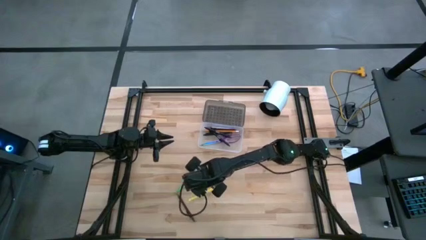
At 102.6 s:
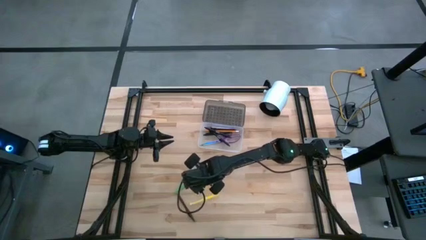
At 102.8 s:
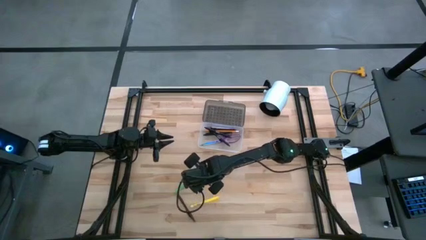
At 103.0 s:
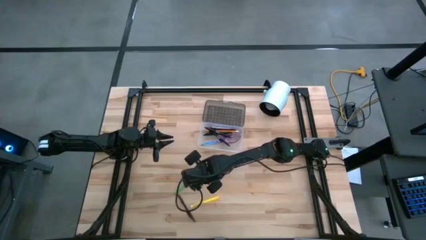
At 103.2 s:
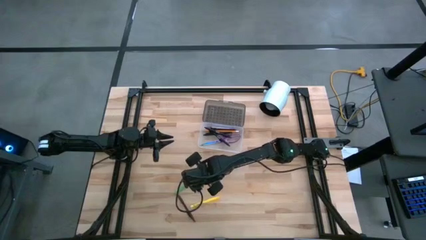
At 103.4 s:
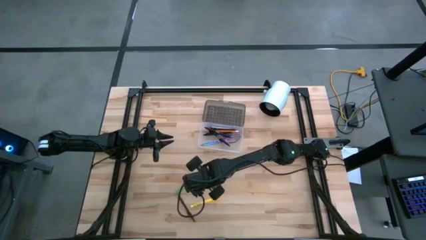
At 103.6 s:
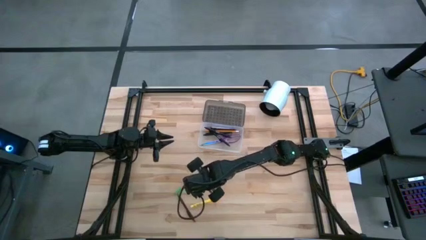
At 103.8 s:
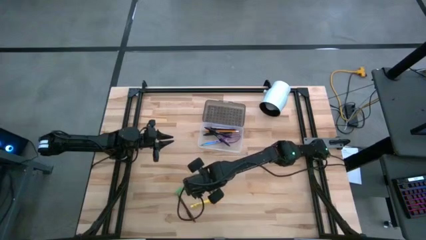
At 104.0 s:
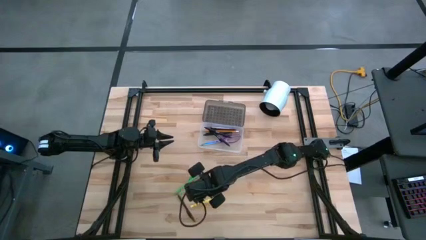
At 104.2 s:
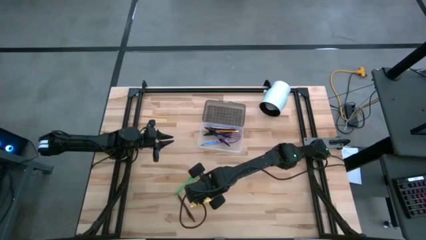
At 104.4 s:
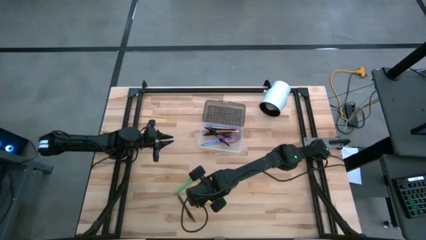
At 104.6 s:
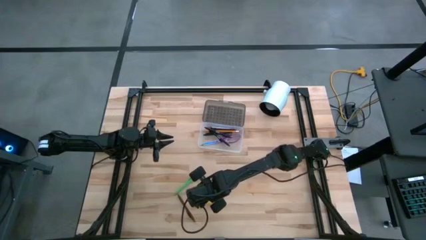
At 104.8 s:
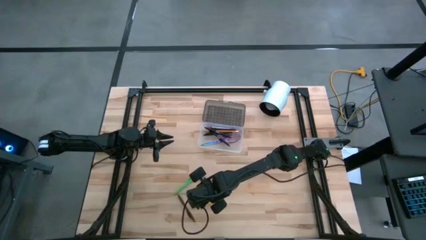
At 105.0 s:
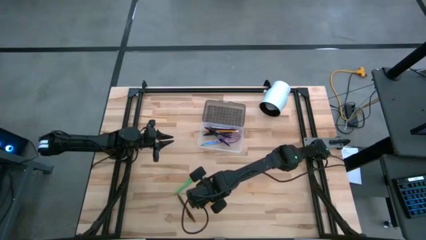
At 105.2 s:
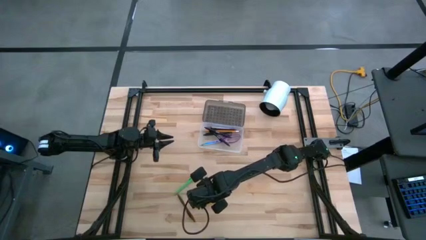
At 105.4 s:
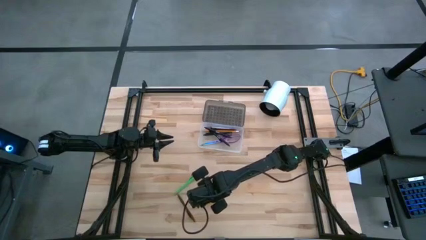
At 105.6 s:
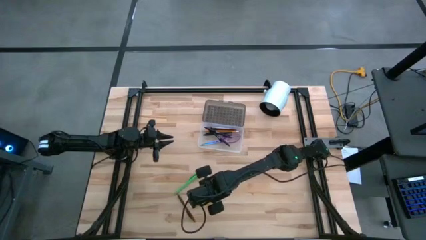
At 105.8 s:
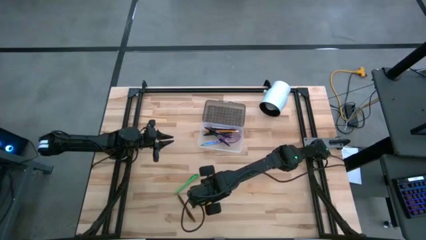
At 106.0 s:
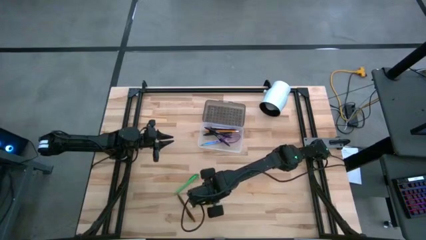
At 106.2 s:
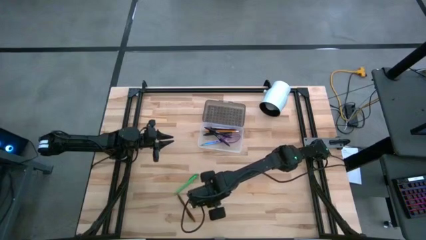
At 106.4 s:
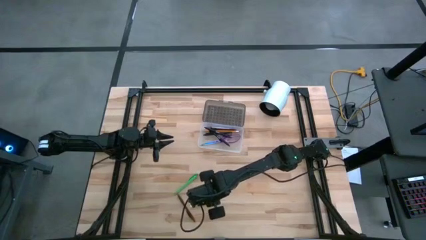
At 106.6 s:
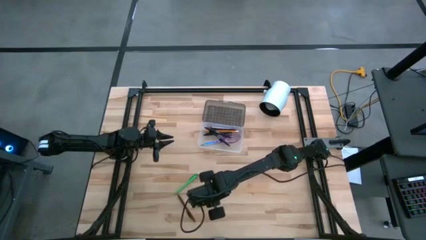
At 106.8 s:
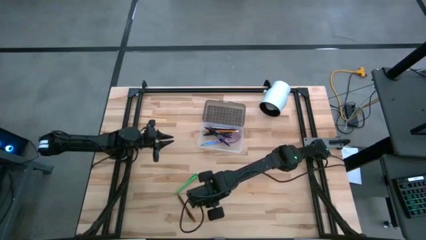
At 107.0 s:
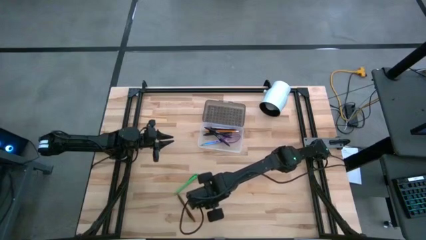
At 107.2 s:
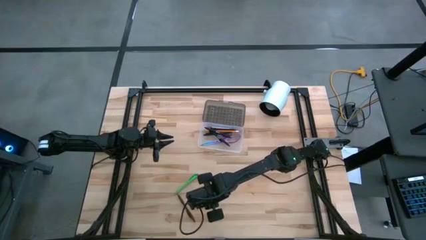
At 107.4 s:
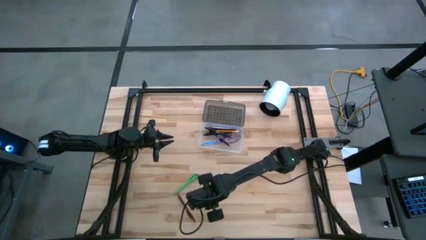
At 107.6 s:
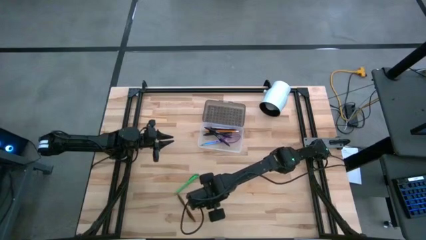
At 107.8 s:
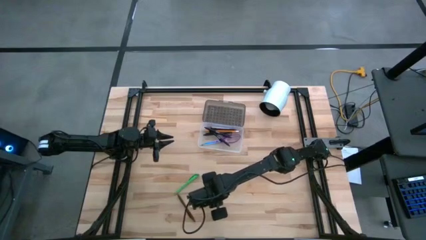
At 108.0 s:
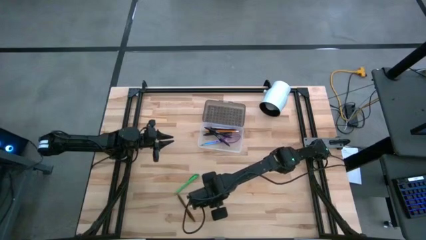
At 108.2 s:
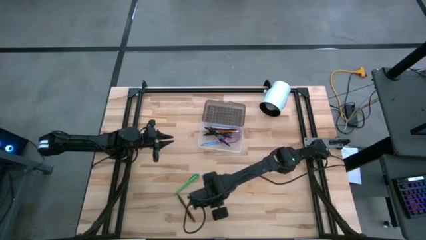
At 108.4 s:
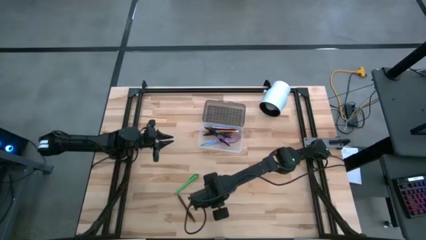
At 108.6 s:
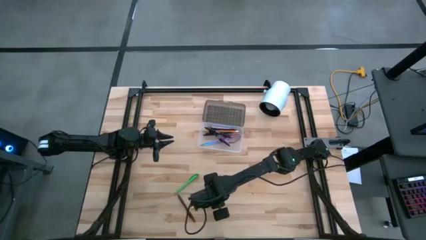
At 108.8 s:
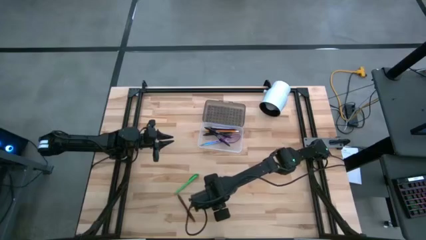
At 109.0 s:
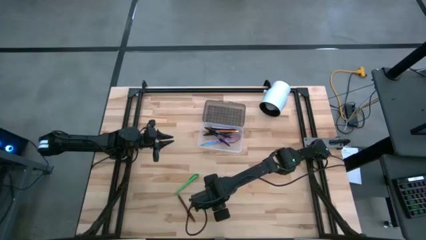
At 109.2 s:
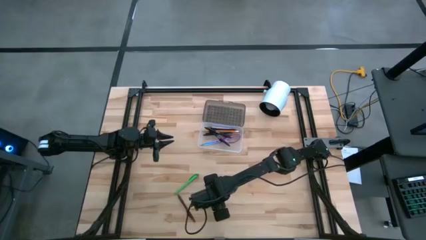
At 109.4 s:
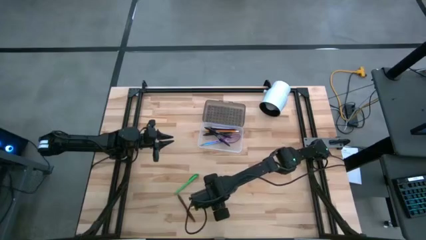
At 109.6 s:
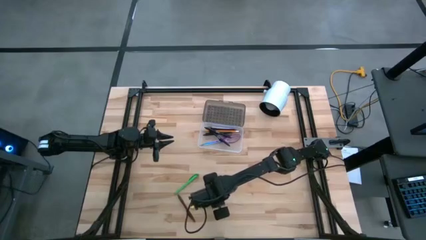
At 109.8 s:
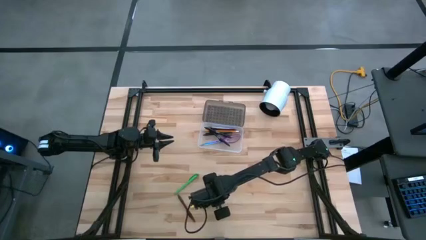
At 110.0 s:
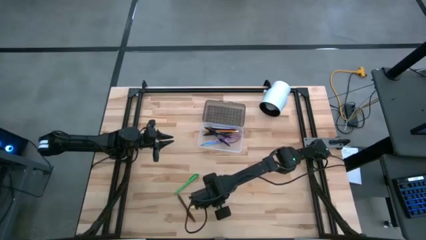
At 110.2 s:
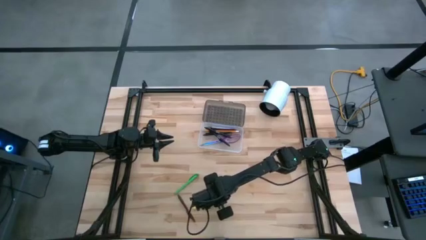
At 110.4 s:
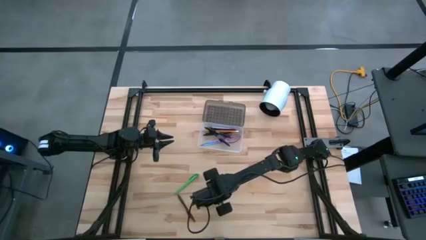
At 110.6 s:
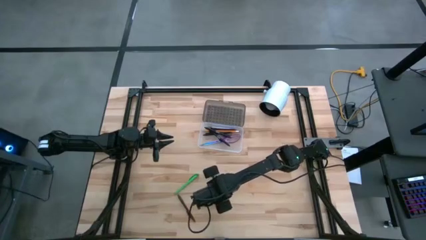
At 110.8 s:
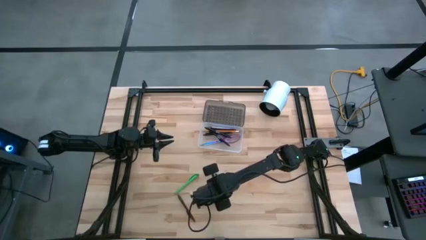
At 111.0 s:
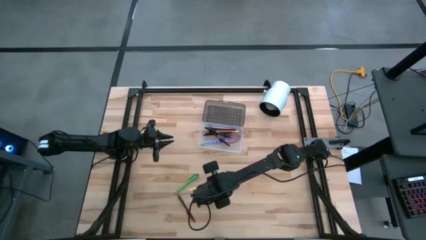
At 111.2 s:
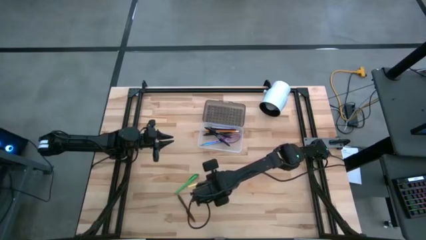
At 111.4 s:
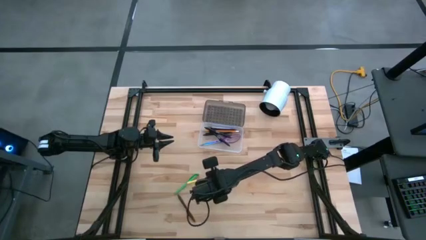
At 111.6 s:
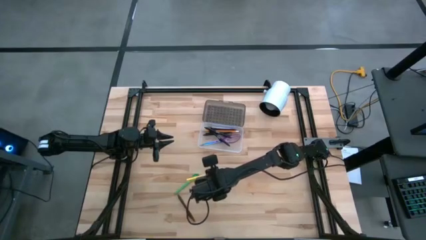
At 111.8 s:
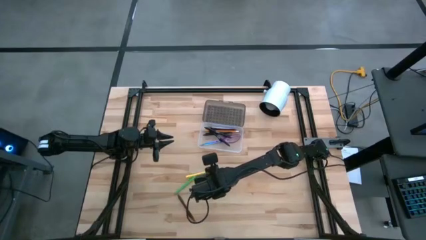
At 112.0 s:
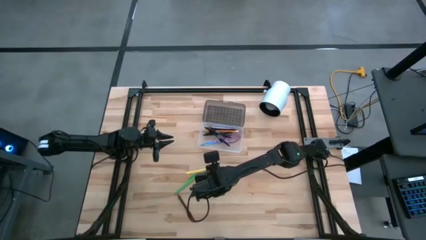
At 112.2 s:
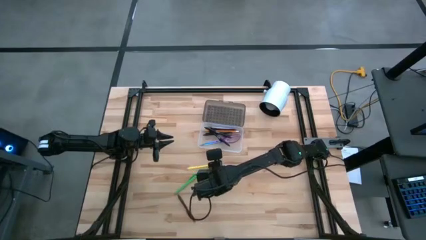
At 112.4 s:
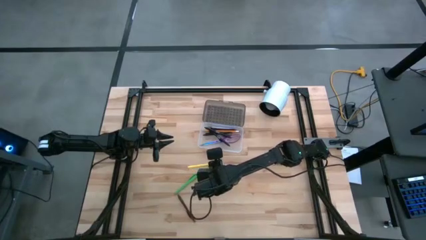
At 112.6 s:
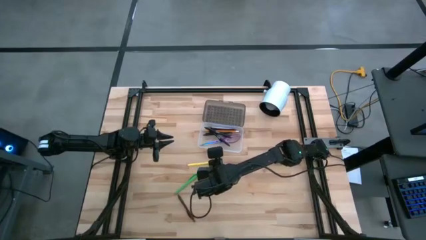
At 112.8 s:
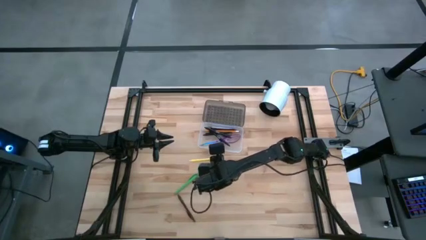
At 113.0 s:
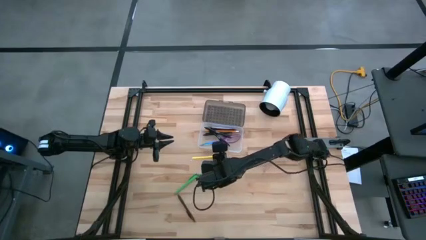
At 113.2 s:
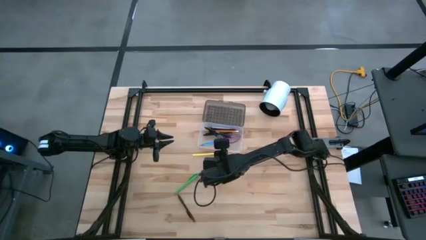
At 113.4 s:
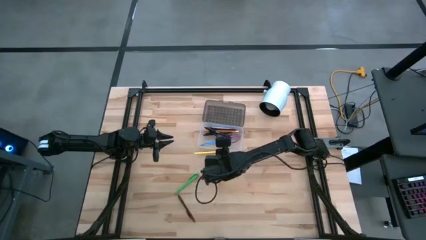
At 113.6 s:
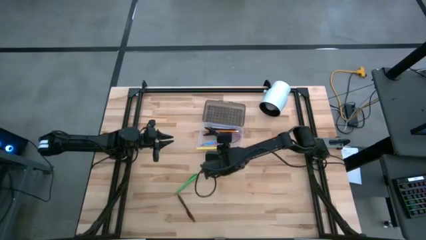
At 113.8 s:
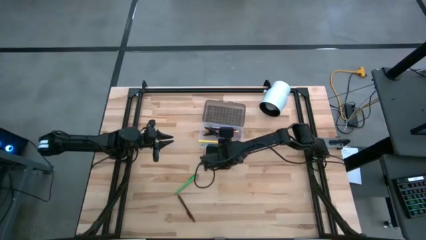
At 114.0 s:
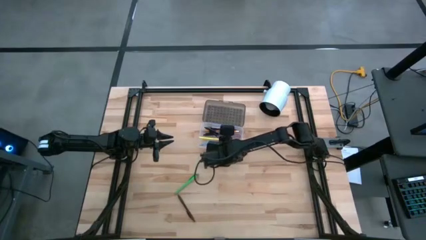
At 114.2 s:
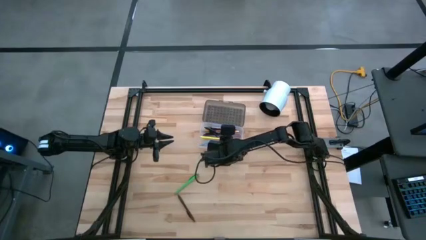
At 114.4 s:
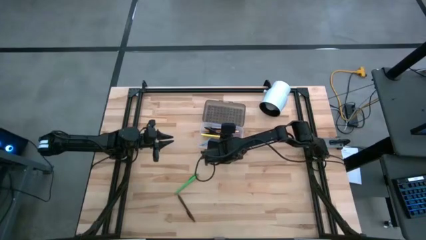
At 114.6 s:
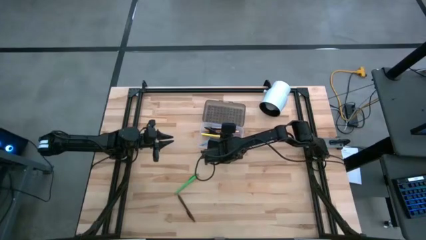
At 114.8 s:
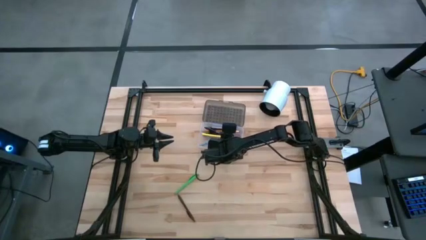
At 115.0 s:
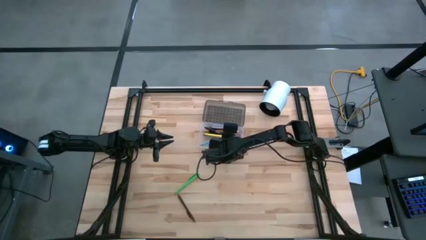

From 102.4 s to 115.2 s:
Task: Pick & place school supplies into a supply box
Put the yellow pen into the supply box
